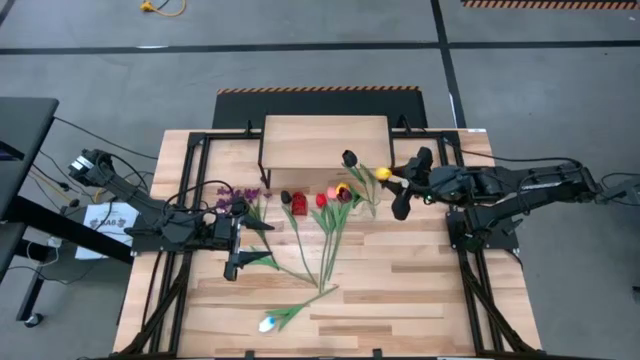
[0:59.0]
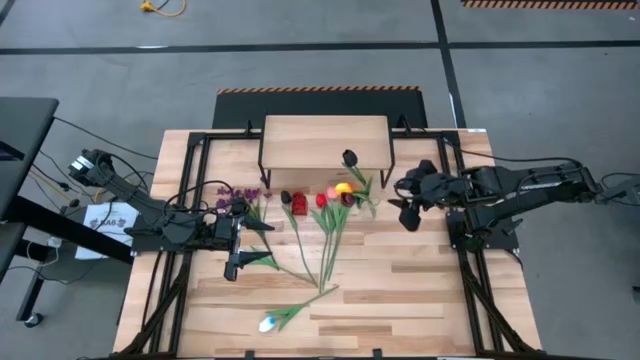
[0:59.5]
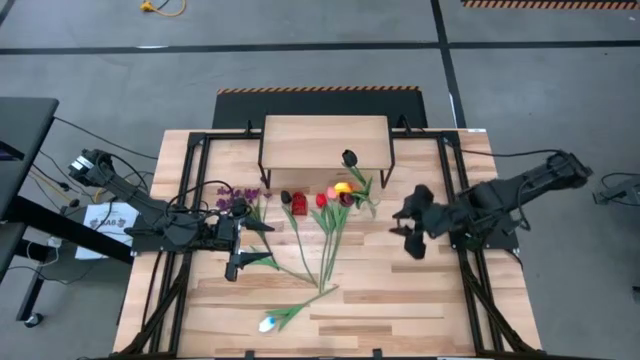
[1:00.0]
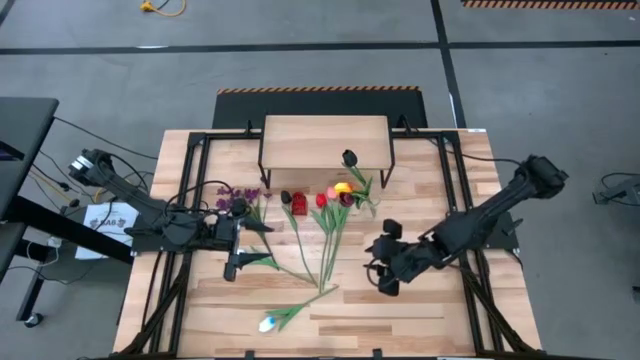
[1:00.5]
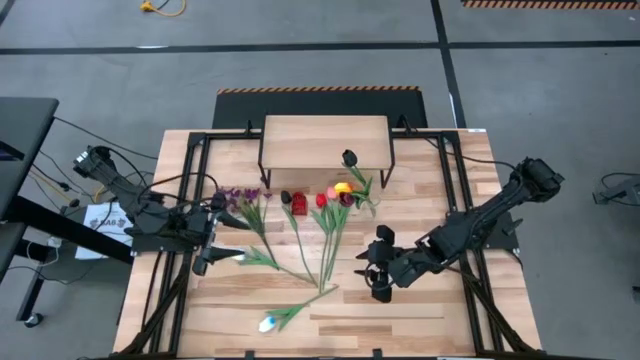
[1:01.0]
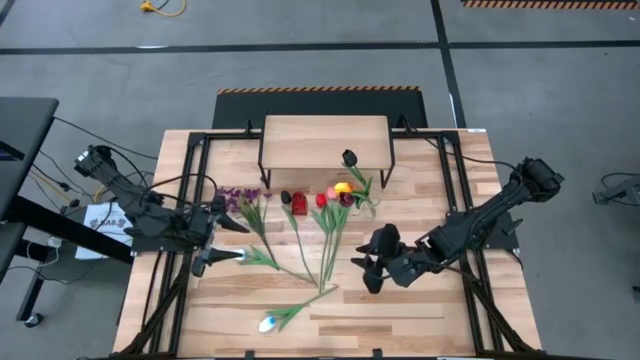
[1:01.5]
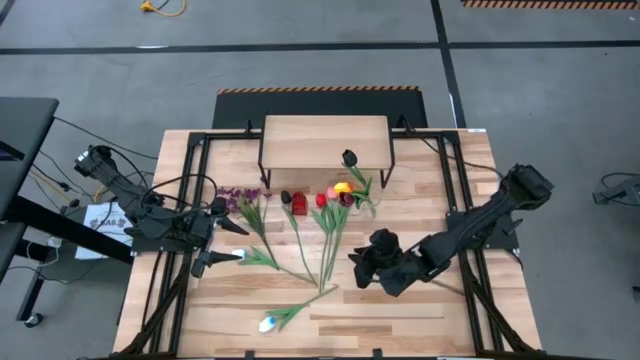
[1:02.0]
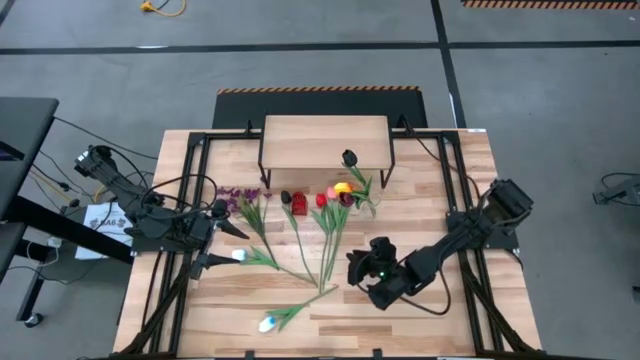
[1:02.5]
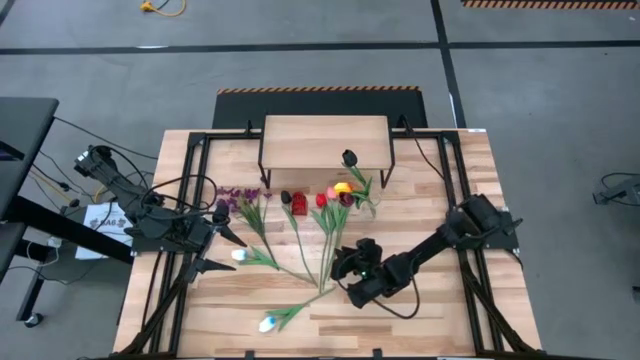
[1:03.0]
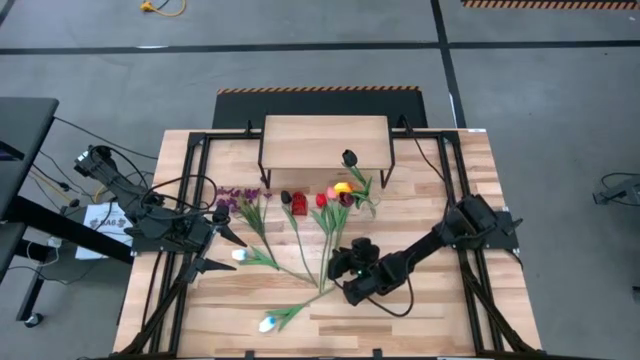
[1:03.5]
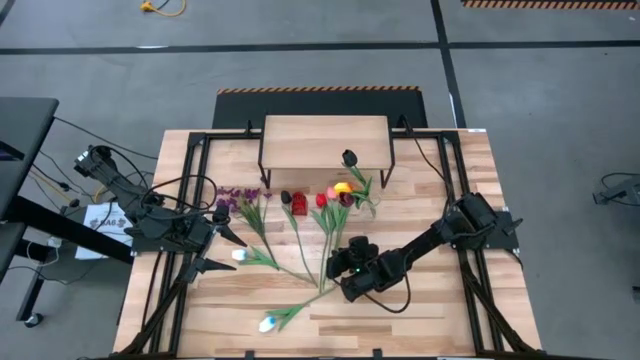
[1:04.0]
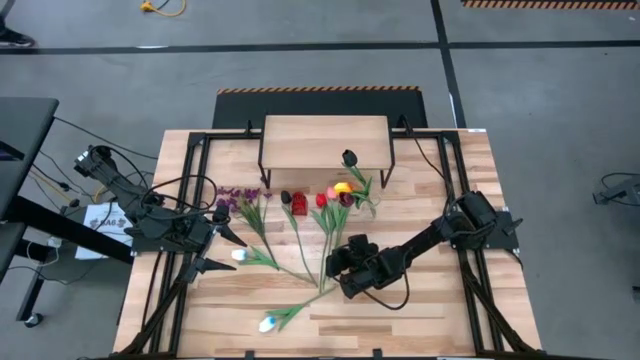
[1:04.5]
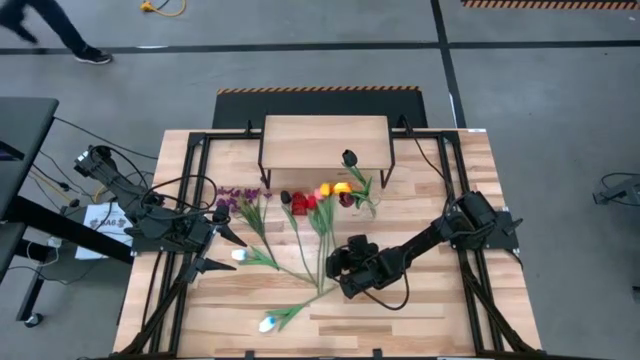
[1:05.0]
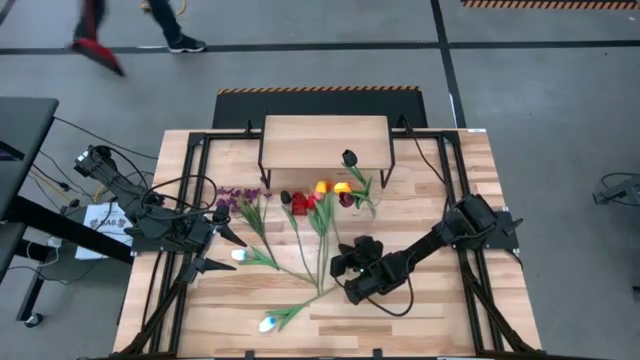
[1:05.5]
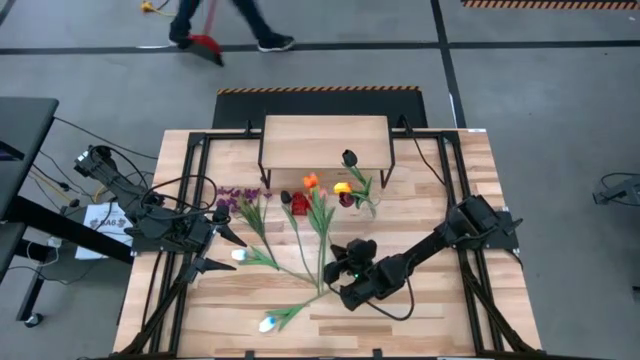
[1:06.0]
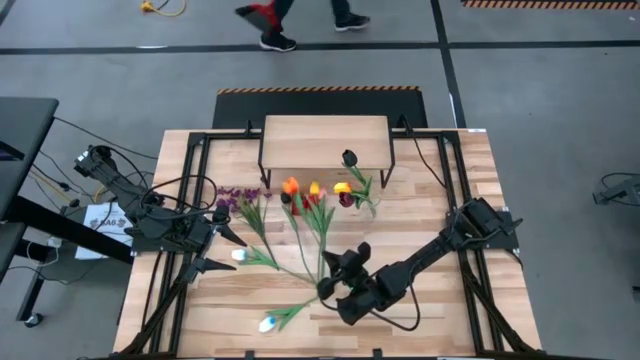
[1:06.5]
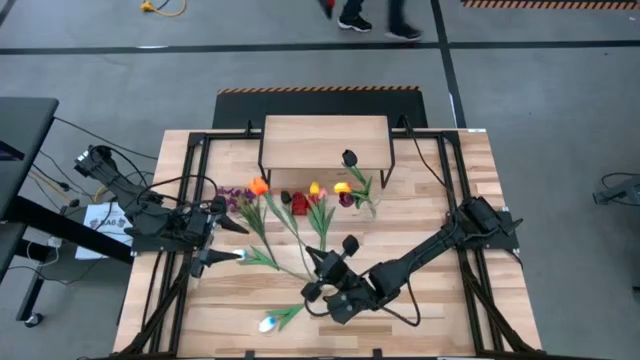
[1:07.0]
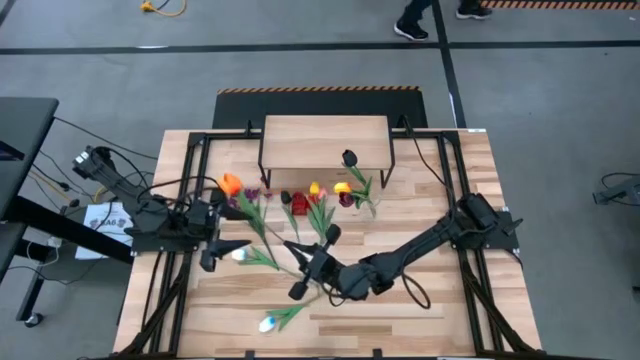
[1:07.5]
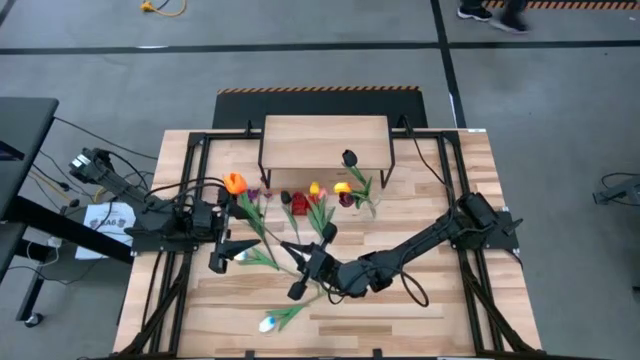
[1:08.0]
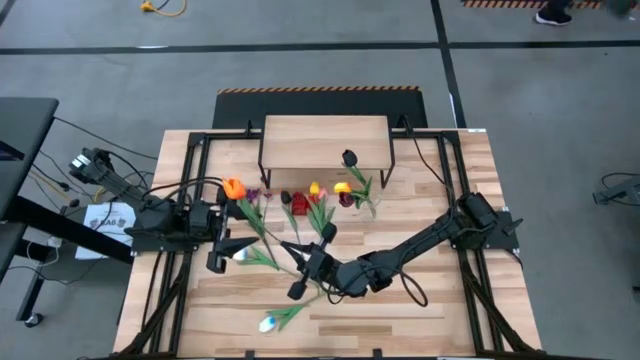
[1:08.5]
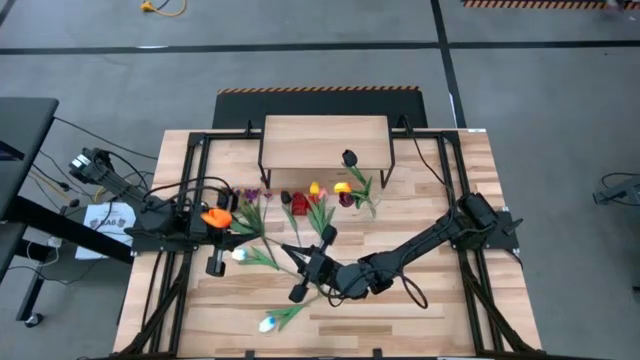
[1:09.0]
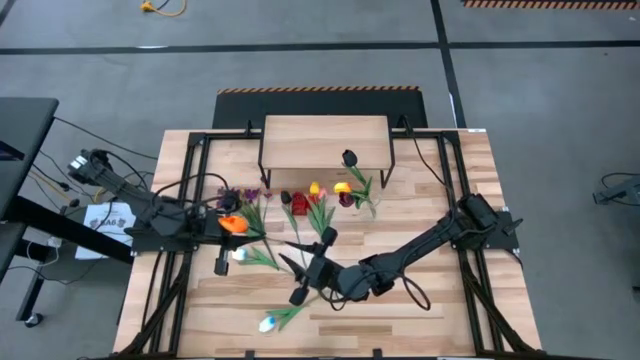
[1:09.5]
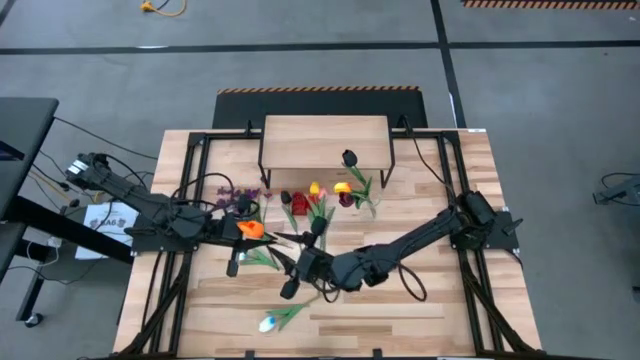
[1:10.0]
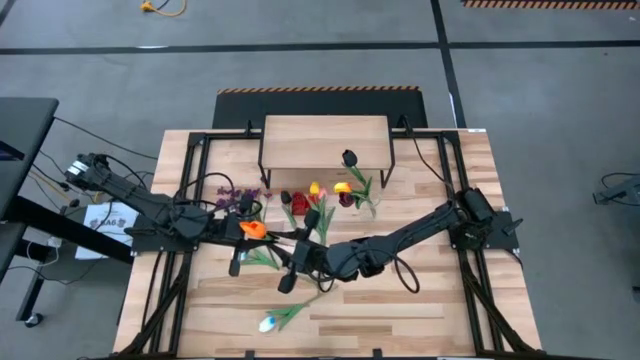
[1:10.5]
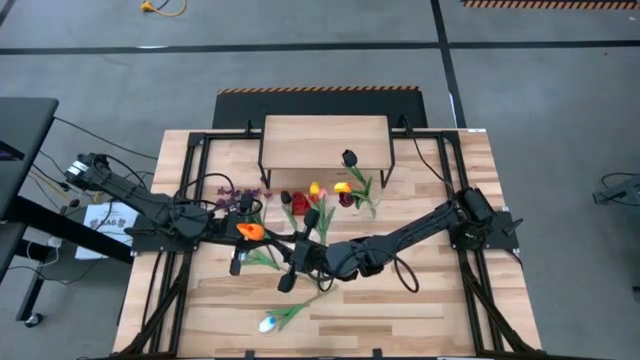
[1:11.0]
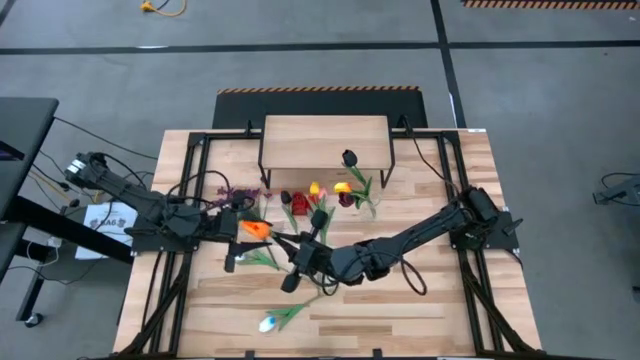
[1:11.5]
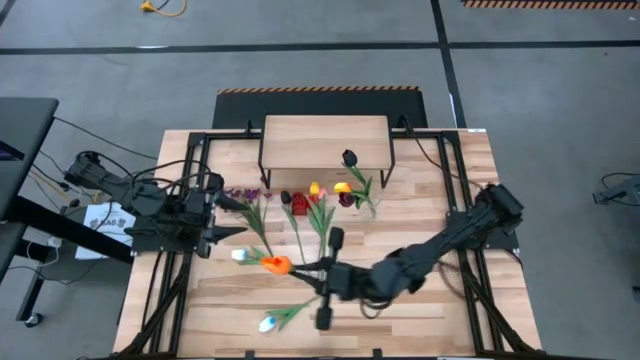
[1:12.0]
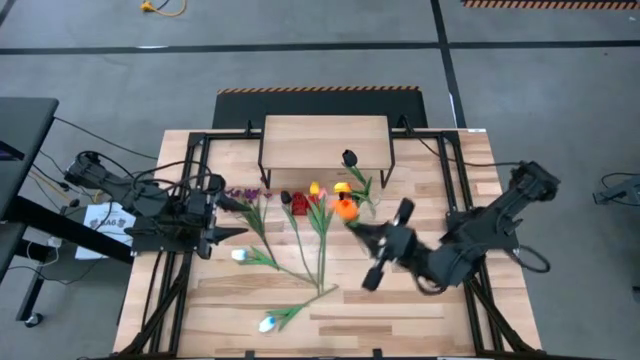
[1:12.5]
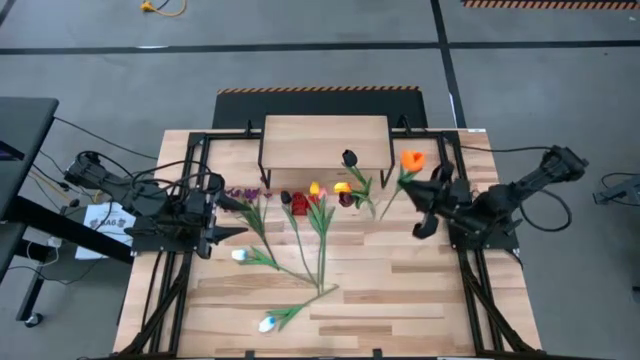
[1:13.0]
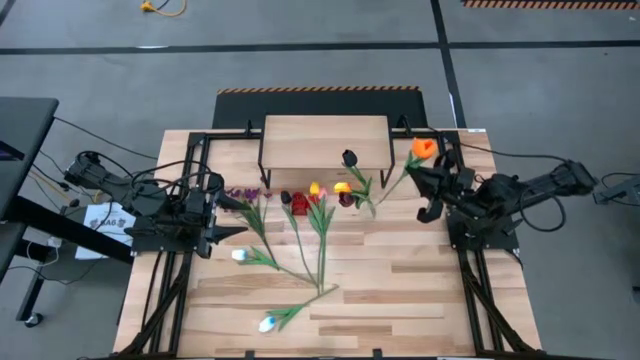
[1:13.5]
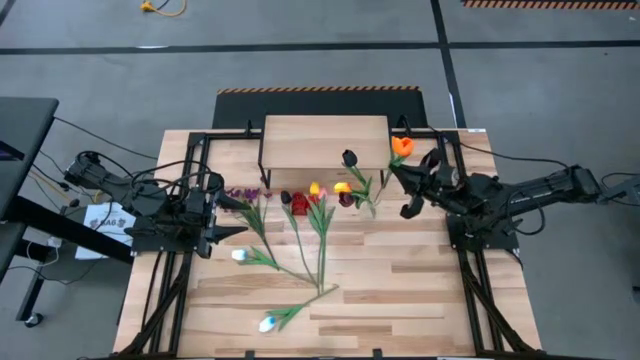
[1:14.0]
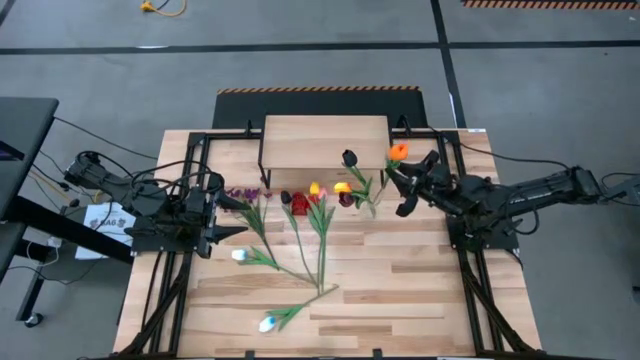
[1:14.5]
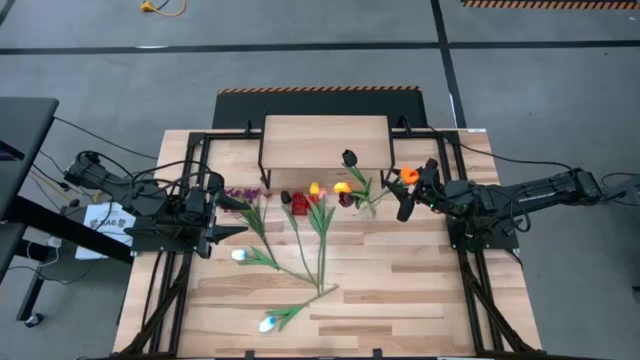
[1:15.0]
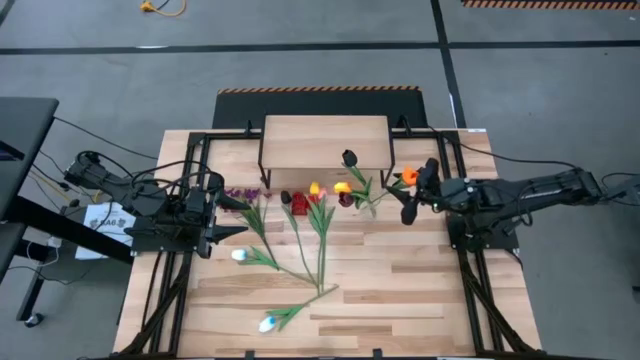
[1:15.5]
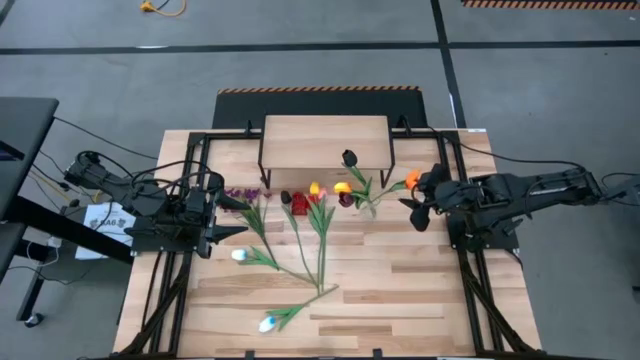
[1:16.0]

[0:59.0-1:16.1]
Task: Pick and place flowers into a vace then onto a shelf
Put the orange flower into the transparent vase
